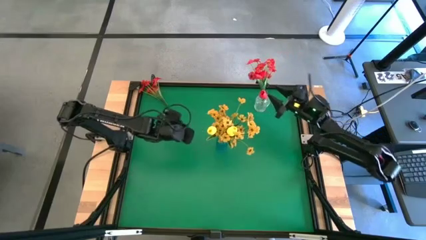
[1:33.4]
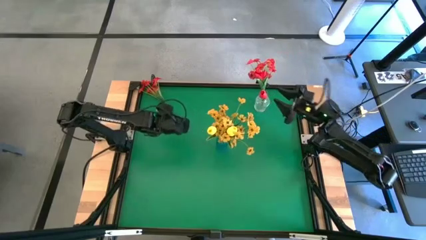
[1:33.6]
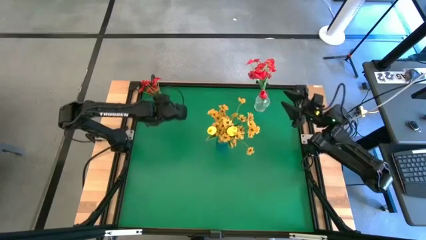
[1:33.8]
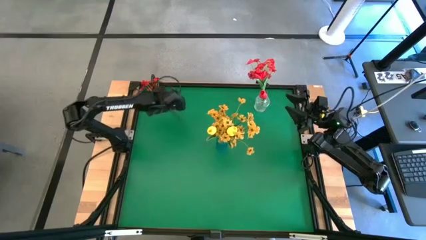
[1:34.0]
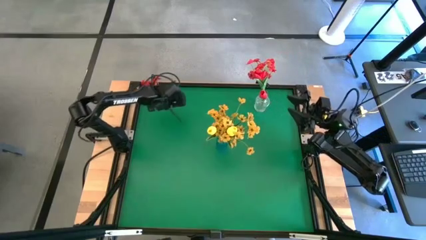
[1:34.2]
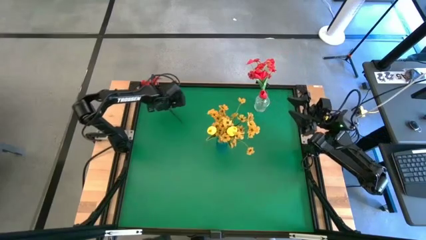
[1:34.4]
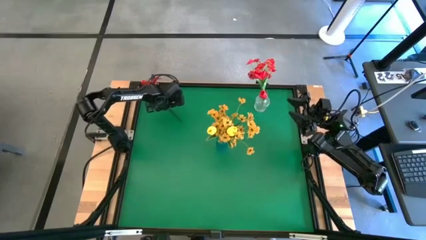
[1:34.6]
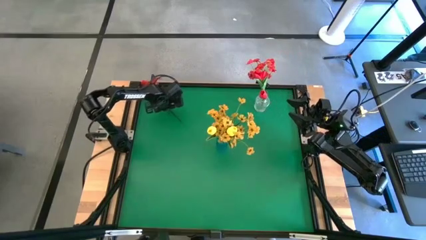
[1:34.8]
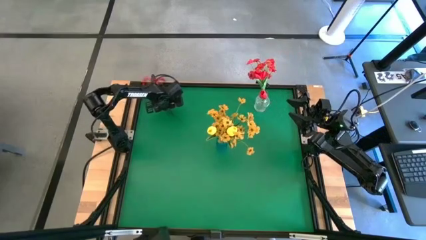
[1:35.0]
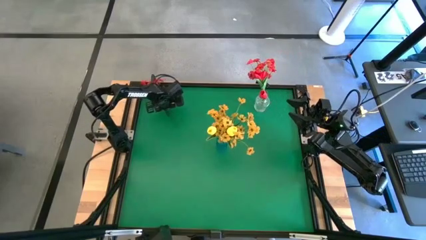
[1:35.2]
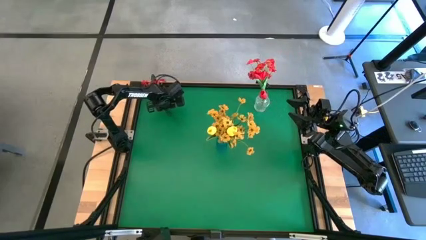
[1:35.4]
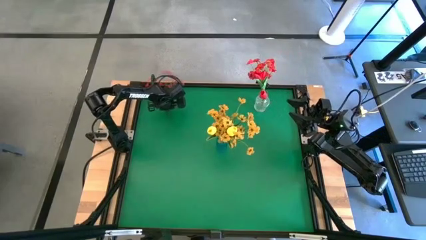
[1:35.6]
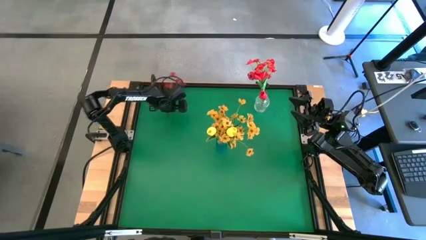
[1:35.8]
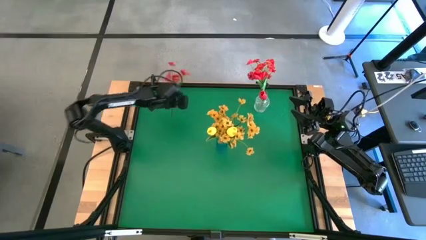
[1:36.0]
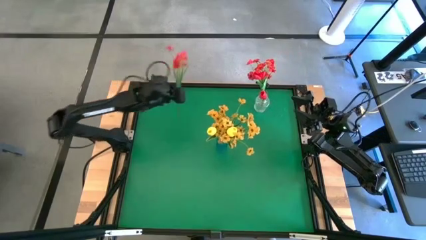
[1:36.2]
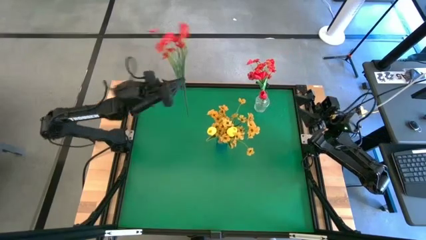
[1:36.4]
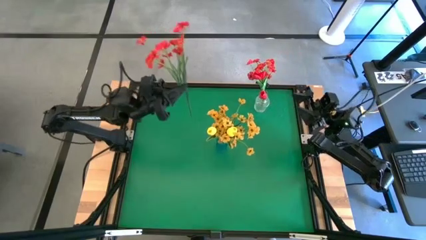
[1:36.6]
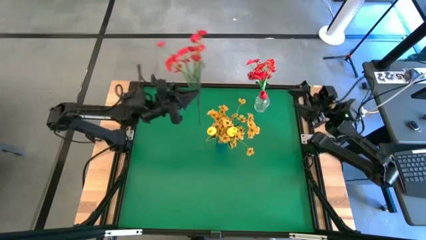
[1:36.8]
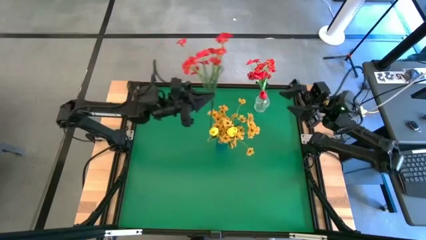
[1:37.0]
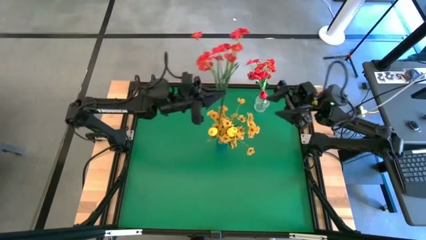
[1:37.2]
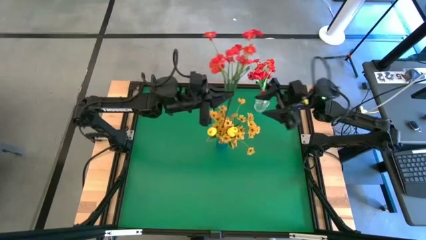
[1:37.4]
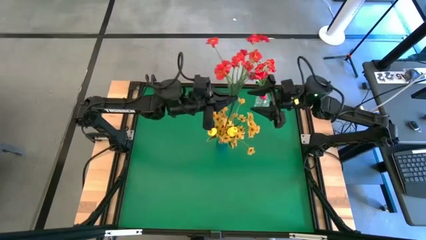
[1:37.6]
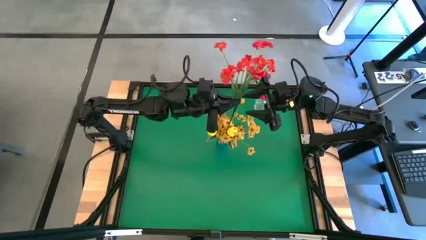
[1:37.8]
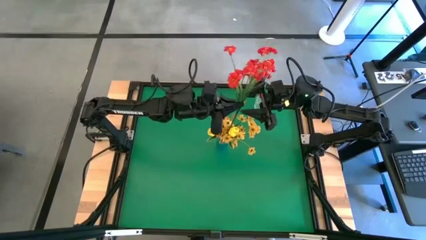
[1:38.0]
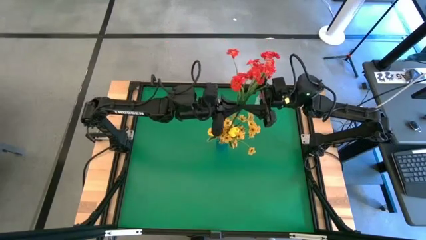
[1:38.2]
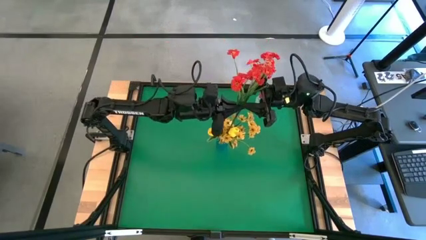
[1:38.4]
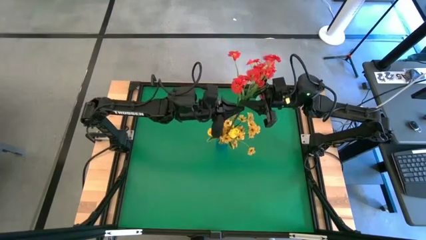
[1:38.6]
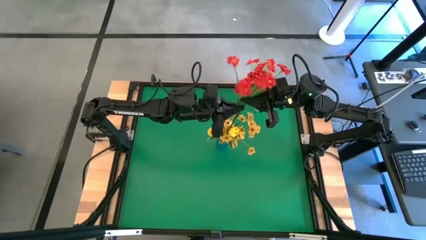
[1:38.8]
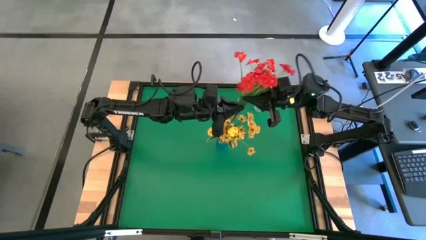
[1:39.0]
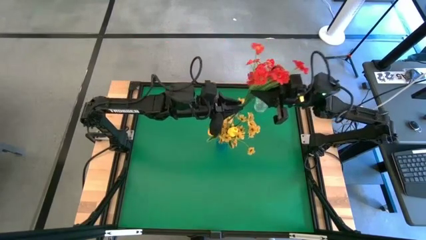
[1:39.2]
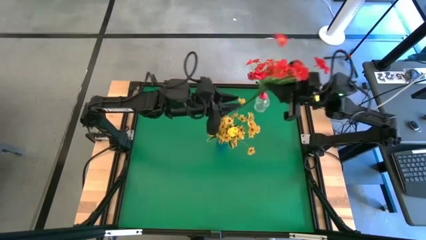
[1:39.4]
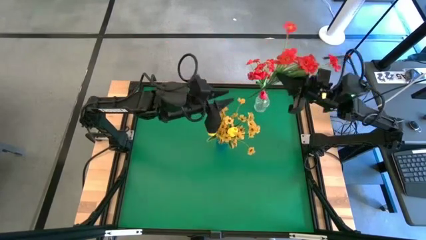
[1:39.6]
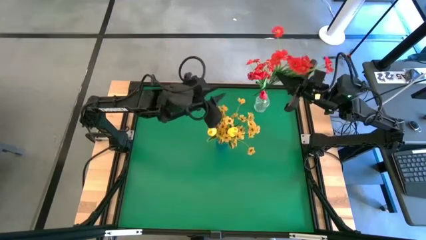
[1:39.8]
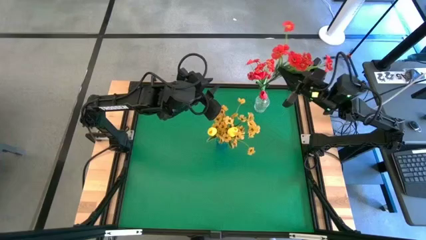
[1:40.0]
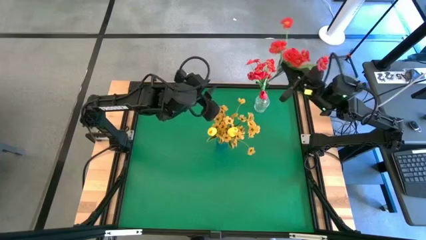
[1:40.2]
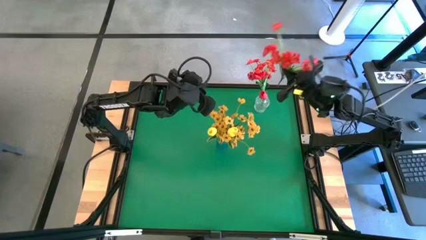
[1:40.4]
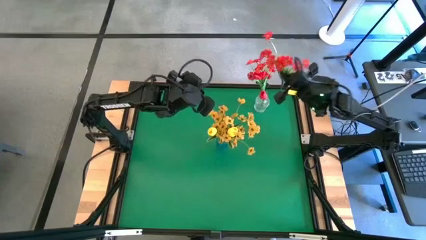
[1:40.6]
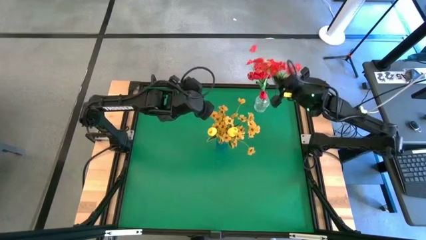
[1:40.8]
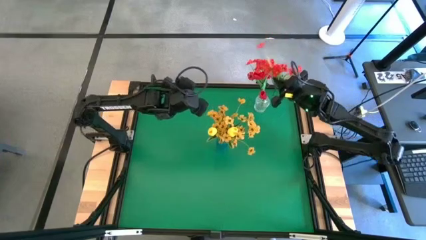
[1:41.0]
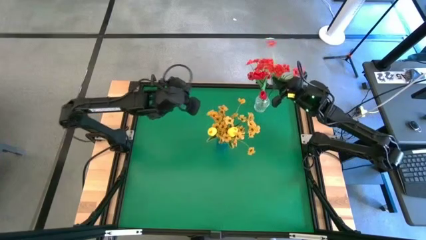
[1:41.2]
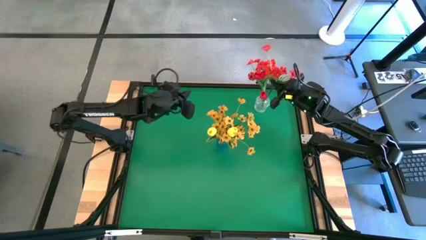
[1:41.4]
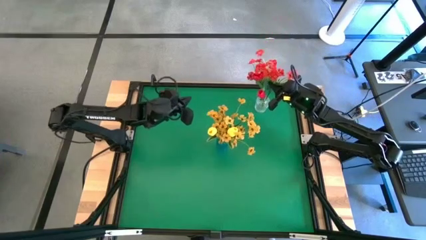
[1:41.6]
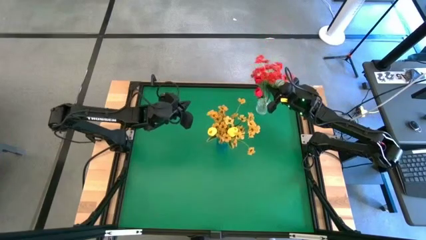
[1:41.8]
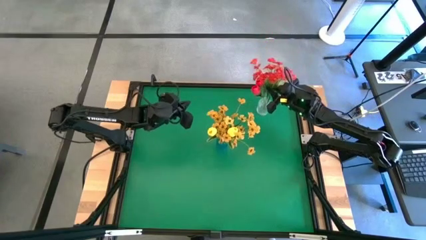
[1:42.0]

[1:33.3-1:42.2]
Task: Sort flowers into vase by color
Put the red flowers into the transparent crystal vase

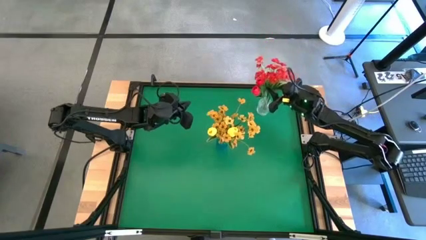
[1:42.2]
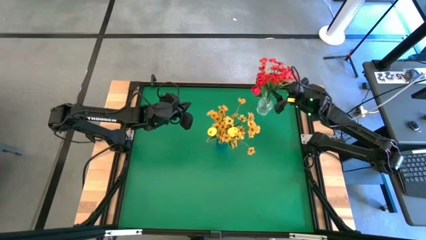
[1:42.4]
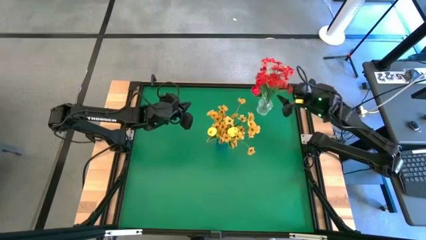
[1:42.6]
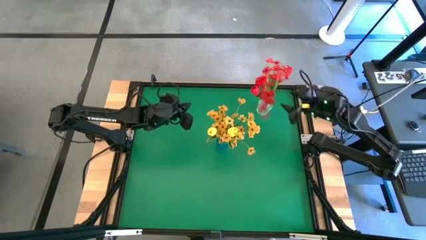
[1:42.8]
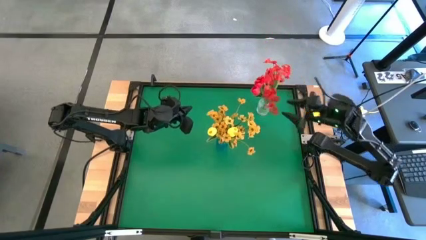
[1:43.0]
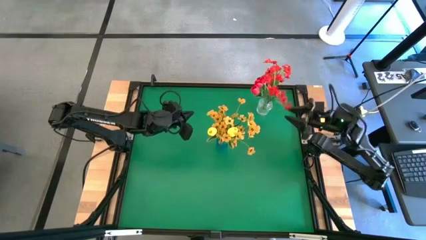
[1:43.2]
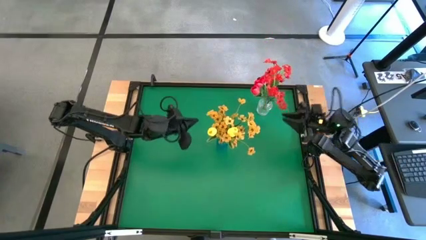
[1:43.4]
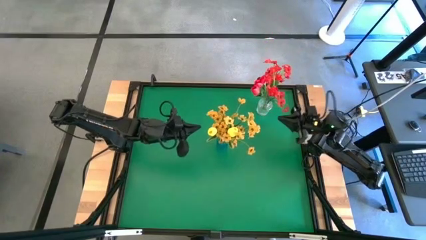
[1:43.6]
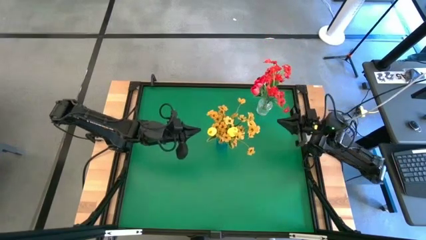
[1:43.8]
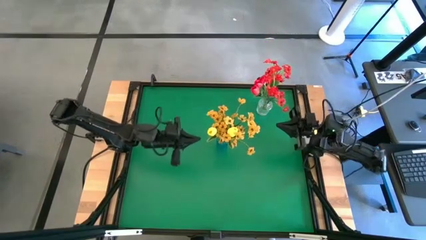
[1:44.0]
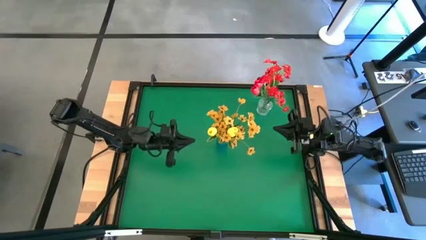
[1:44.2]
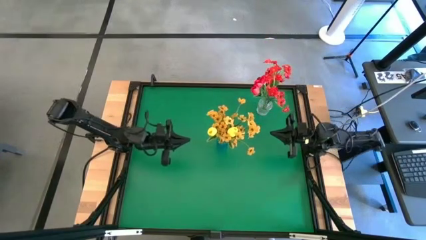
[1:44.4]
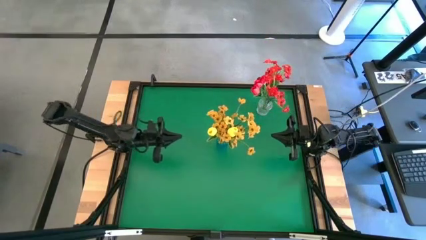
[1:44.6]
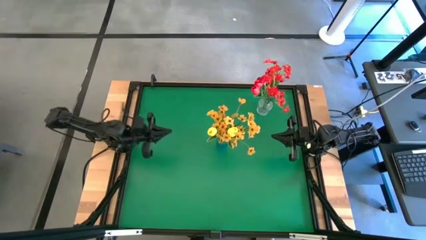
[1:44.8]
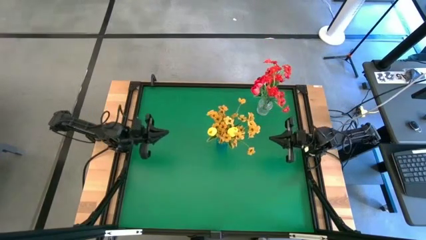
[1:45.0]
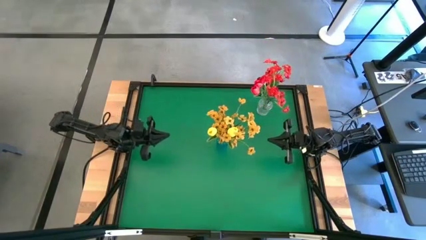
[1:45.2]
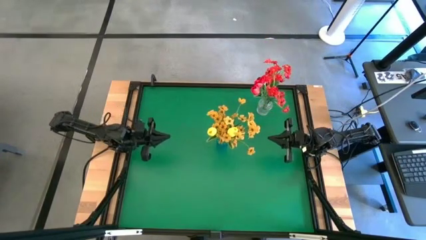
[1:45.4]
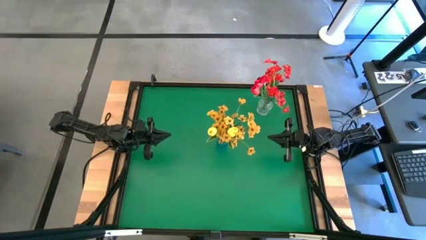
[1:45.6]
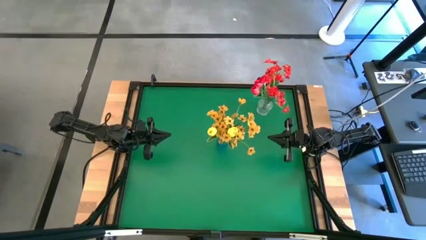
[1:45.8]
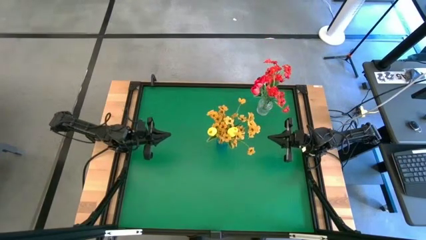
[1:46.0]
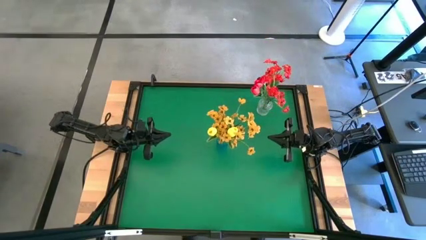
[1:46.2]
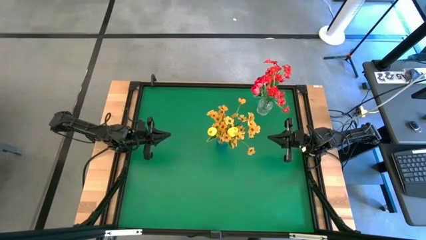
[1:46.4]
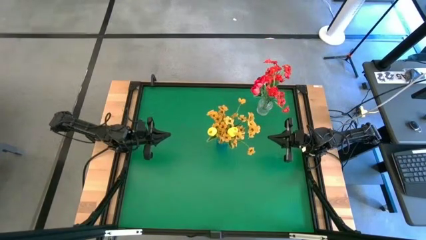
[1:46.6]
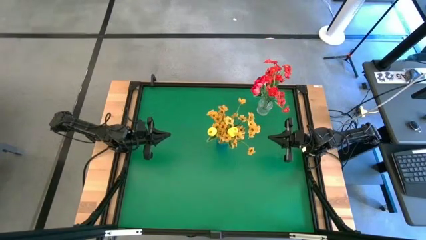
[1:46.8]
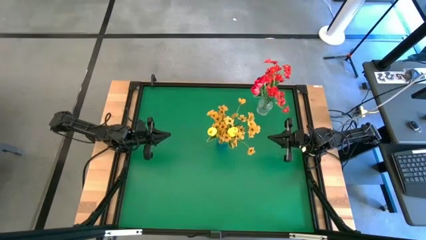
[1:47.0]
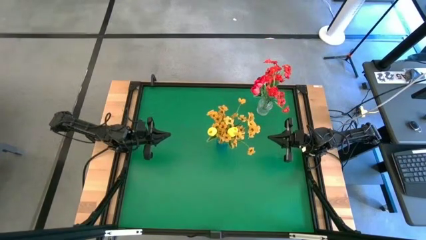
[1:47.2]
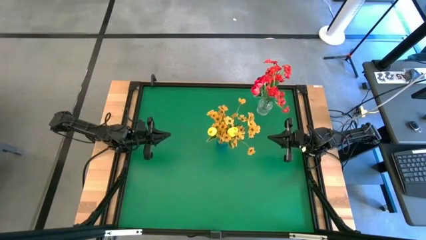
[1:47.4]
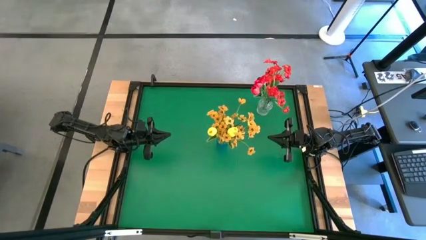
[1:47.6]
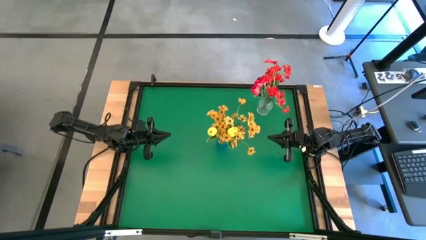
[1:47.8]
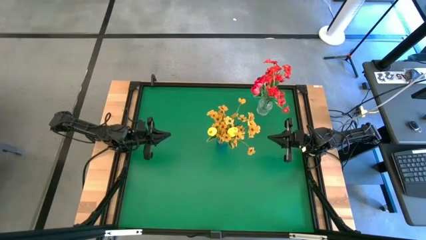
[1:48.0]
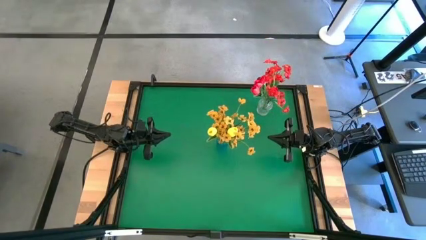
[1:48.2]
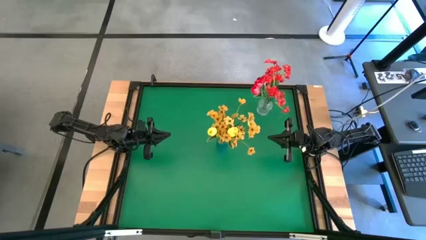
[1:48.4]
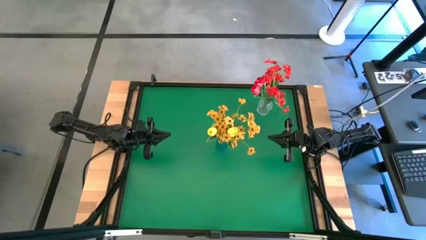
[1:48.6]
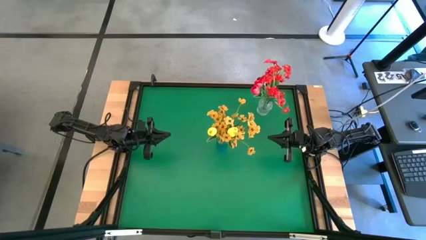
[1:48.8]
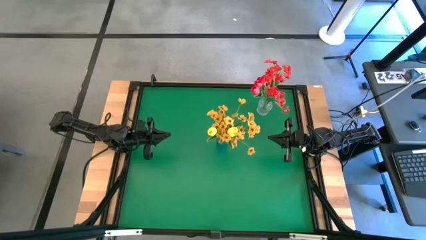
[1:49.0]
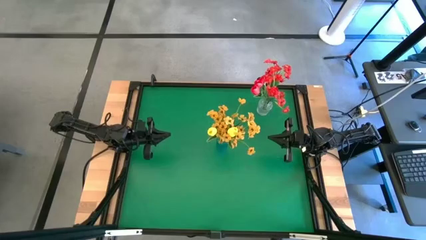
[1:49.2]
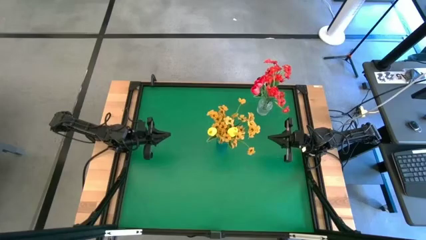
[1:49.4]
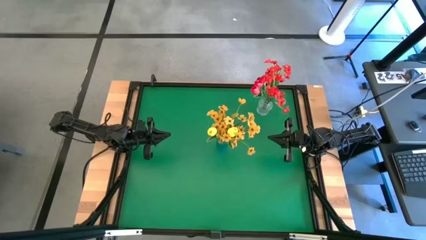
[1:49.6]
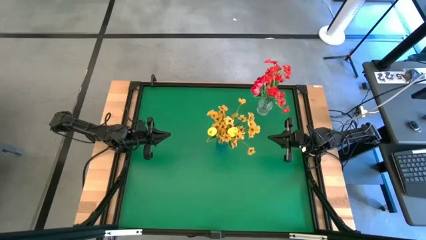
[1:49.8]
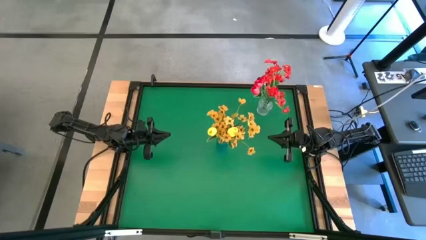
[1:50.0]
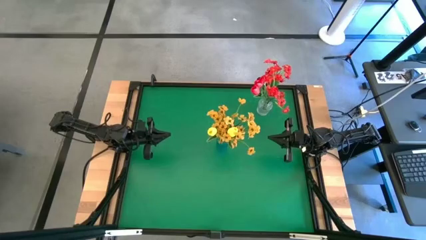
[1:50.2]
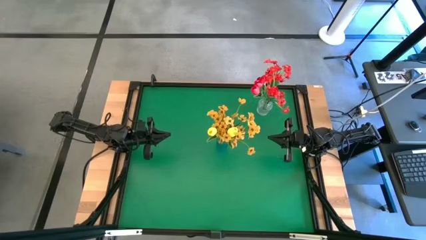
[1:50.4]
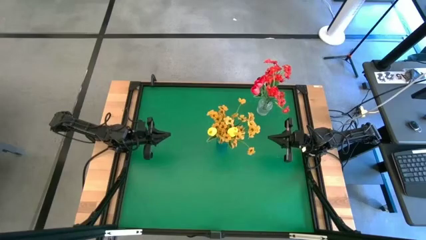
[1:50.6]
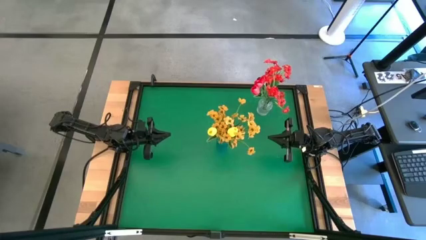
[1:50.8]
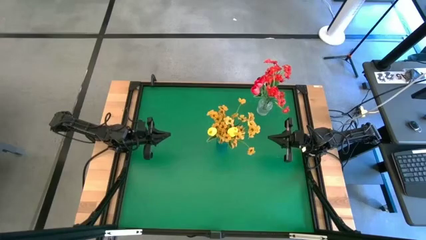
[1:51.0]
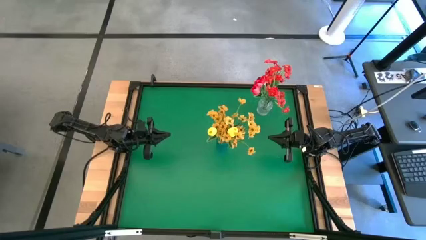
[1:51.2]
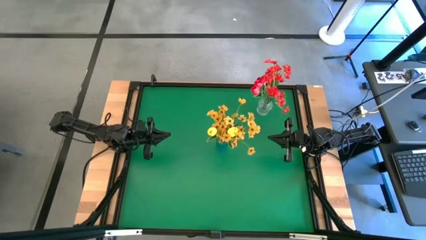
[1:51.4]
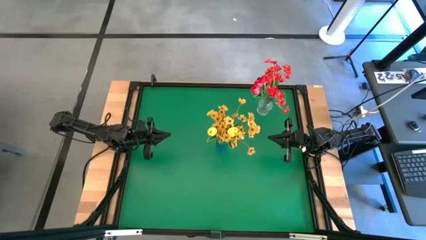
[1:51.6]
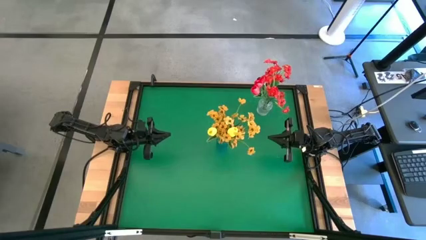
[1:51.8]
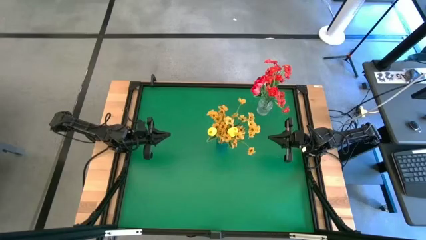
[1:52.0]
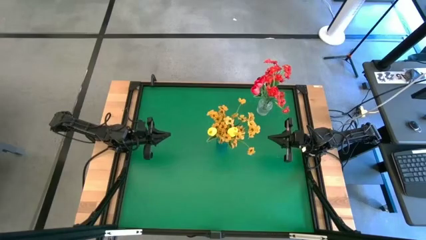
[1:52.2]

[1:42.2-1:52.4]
Return To Home Position
